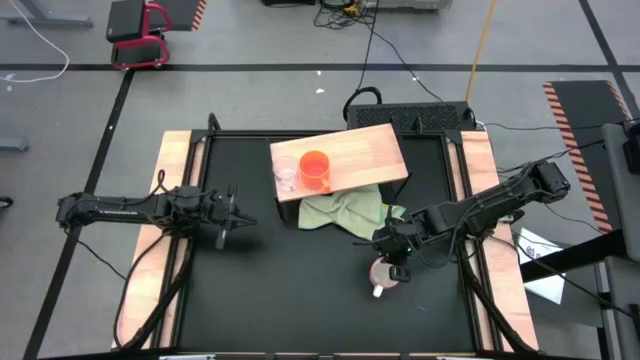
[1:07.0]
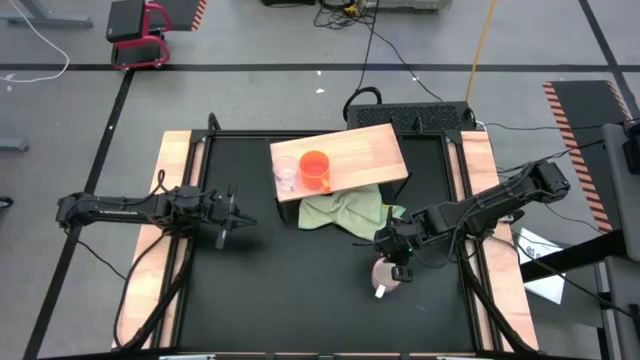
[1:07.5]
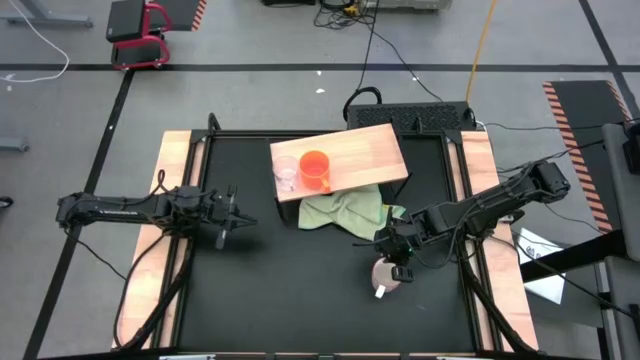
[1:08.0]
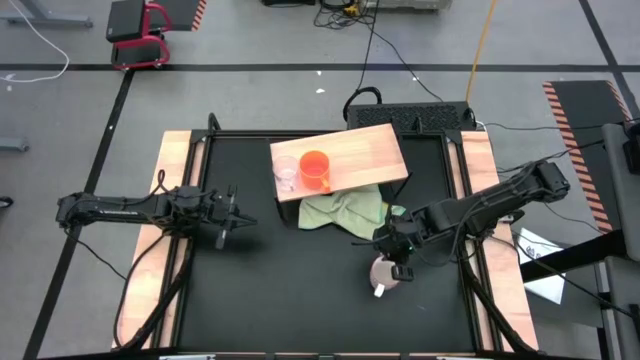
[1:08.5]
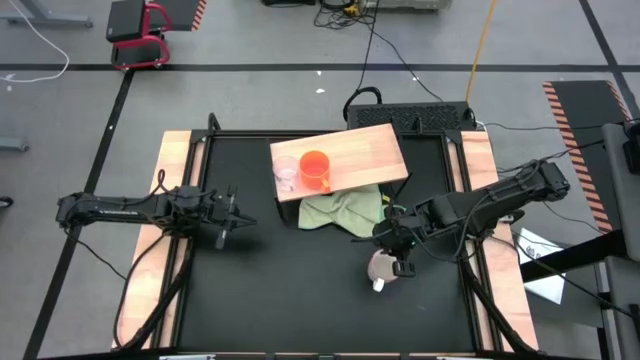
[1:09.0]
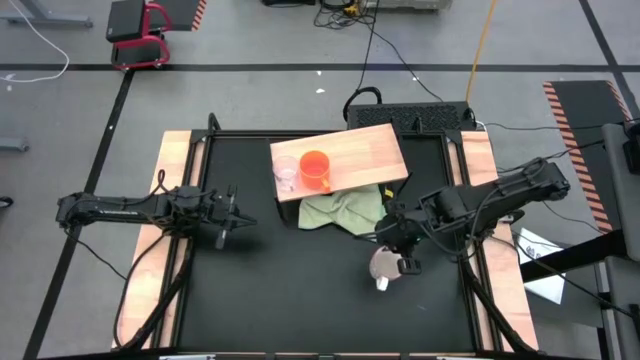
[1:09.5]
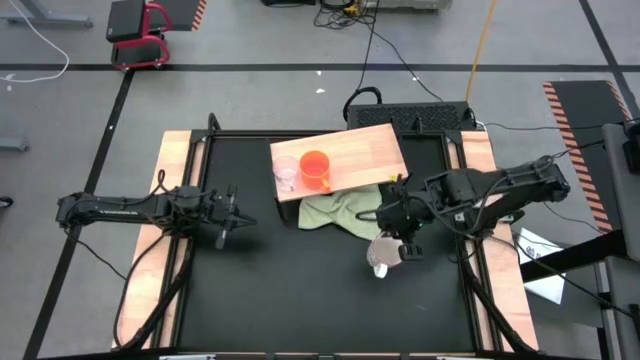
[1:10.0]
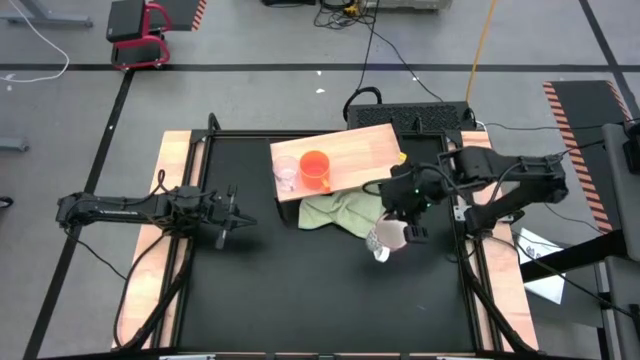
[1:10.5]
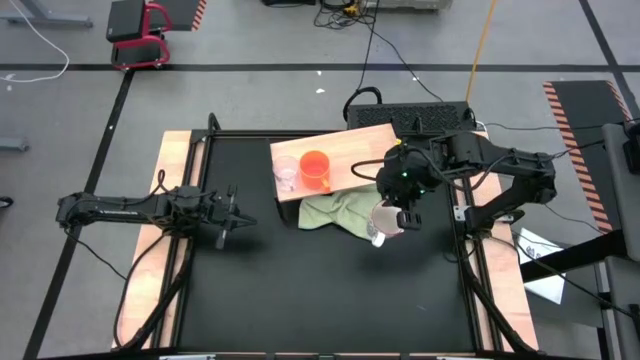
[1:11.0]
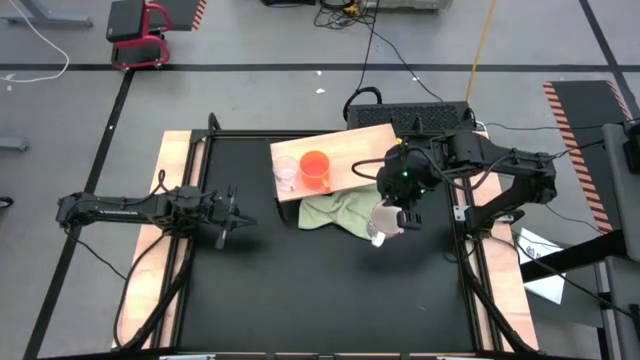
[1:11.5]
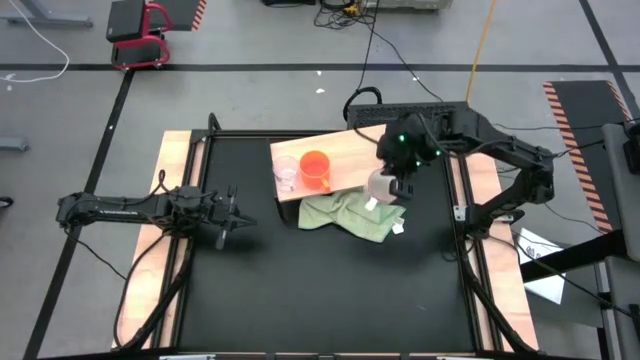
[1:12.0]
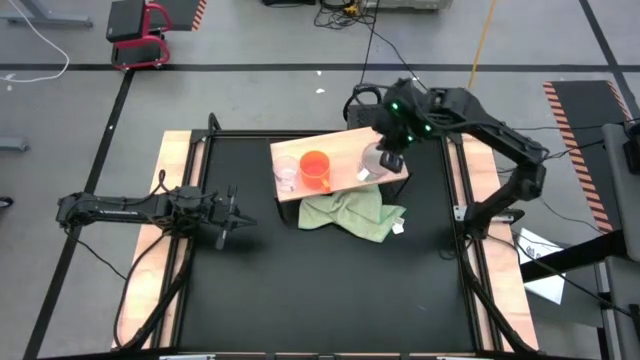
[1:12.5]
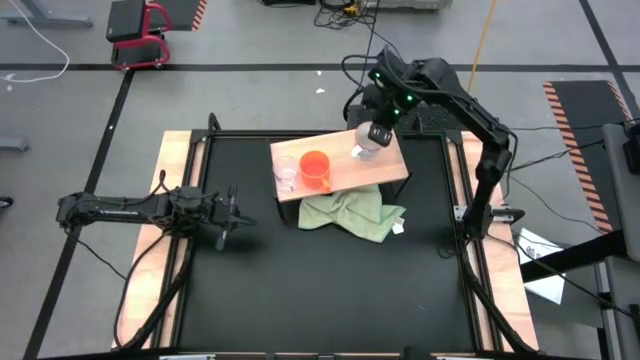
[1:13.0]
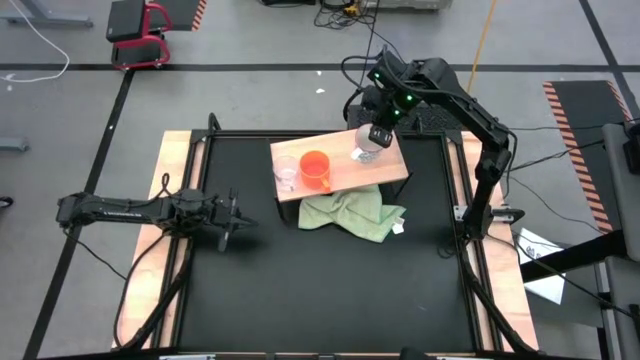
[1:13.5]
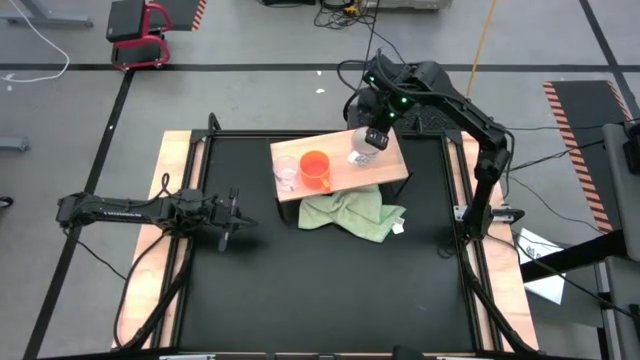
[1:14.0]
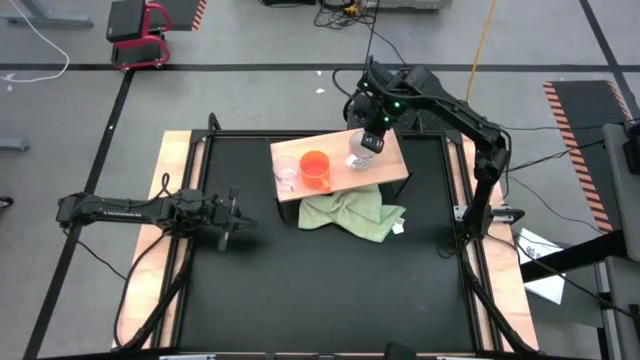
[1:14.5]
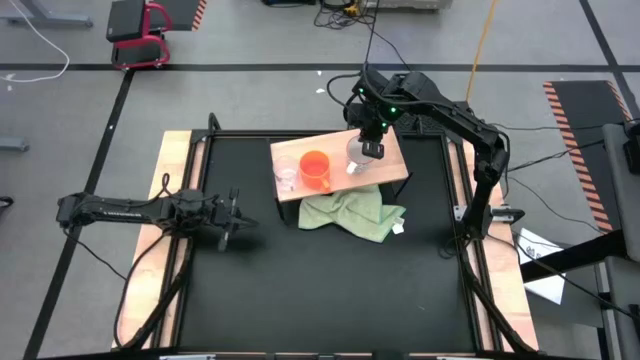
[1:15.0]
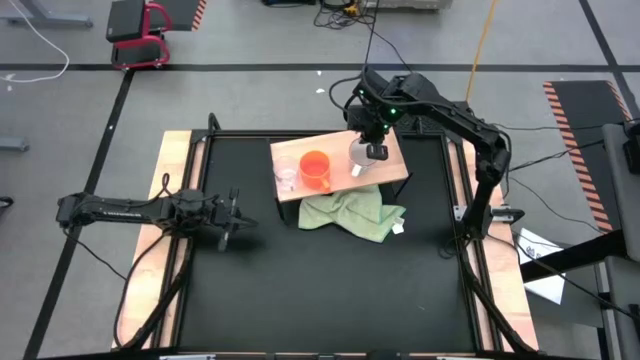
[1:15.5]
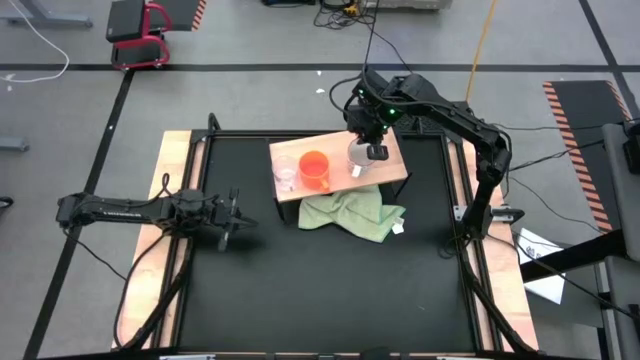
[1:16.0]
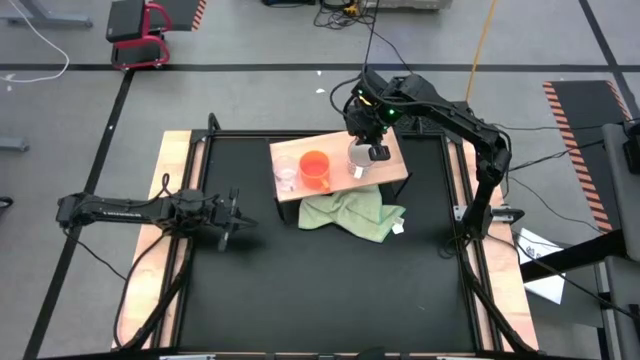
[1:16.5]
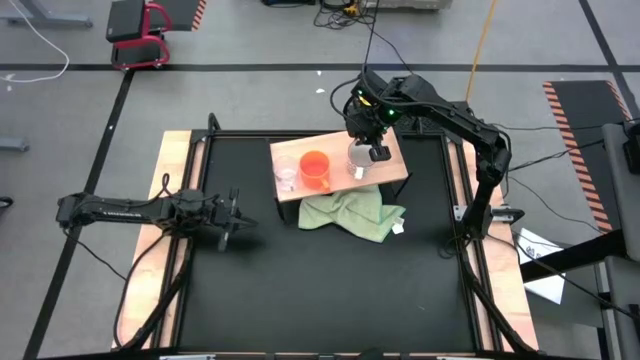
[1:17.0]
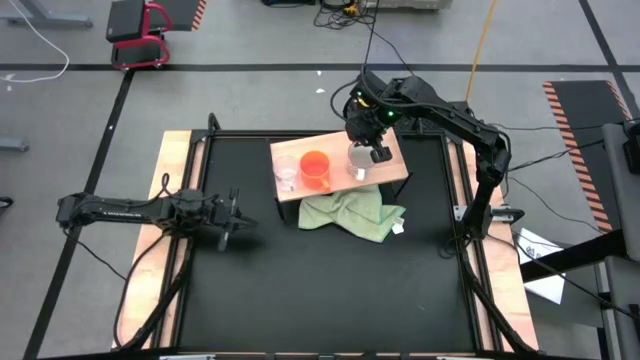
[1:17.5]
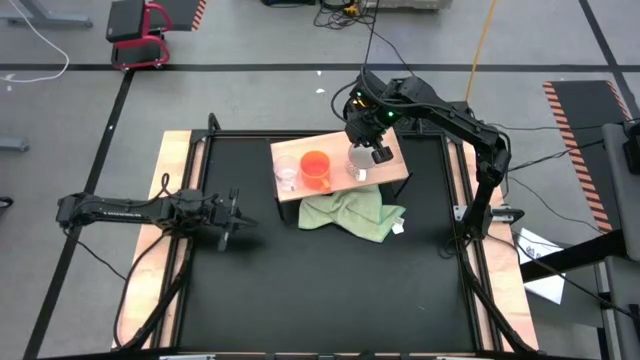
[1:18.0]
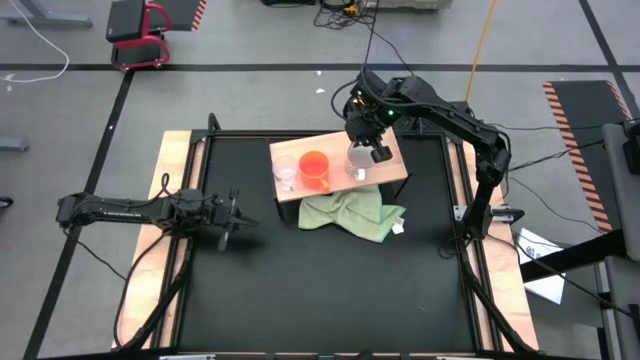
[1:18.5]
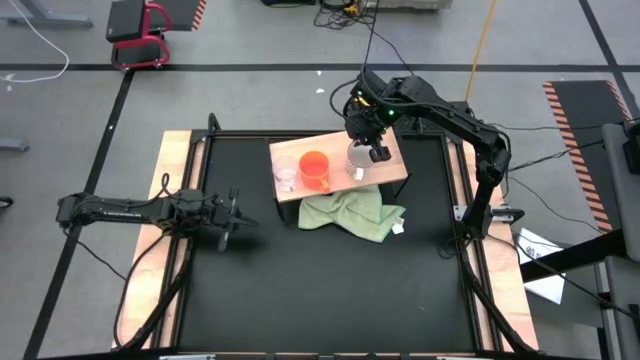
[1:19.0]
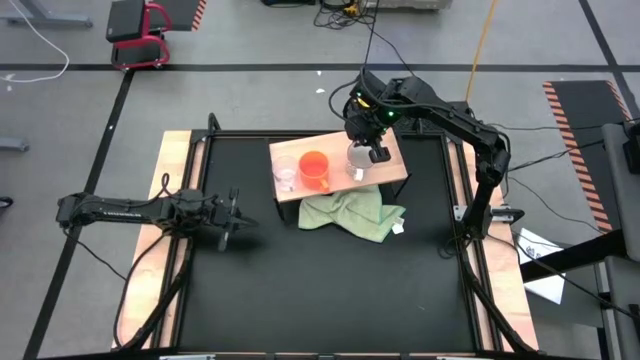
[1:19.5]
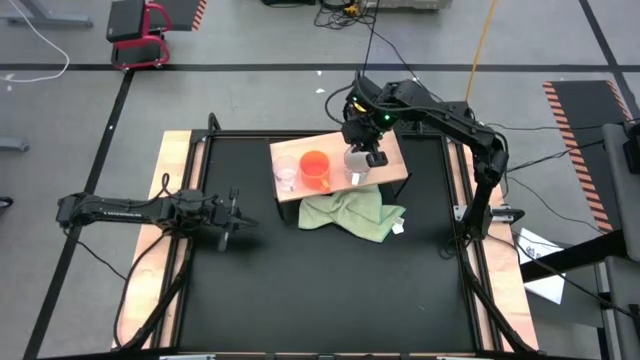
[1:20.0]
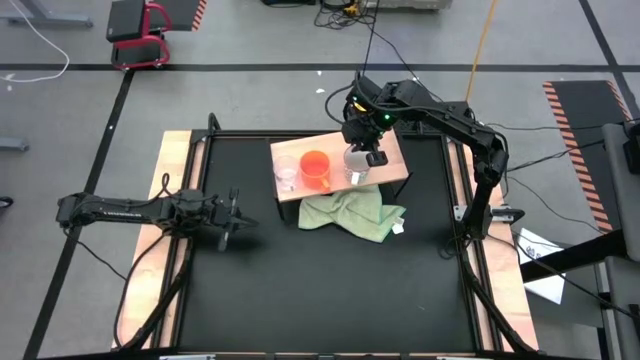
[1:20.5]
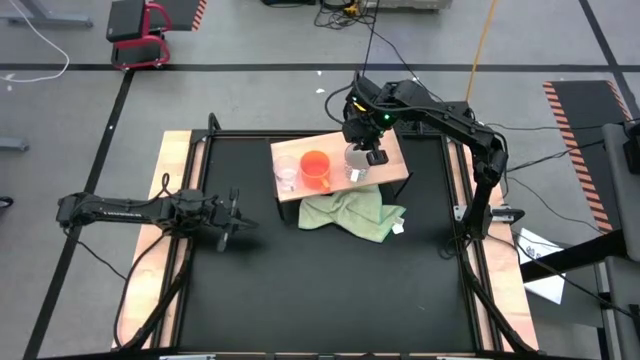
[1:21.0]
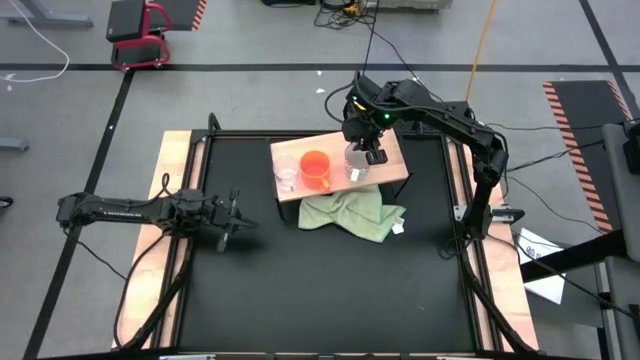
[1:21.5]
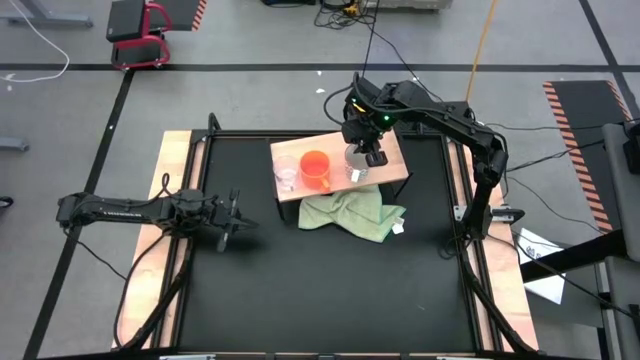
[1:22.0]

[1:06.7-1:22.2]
Task: Stack small to large cups/mugs on shelf
Put white cup on the shelf

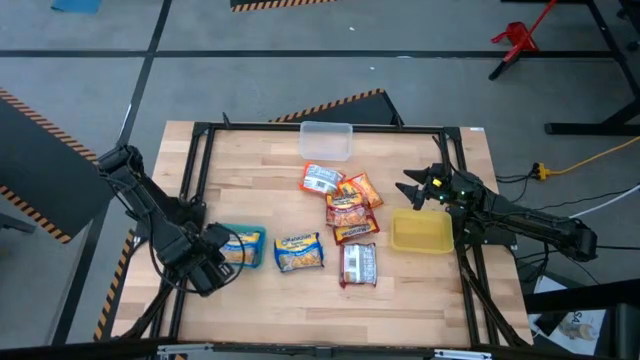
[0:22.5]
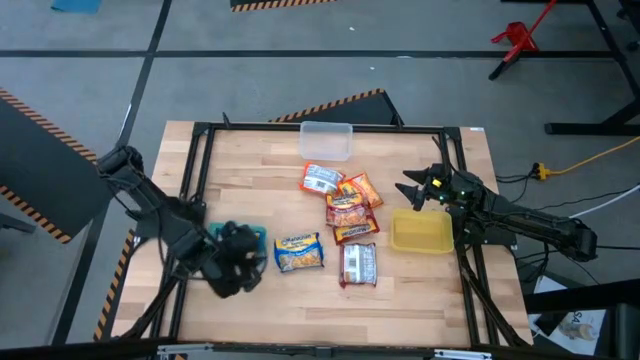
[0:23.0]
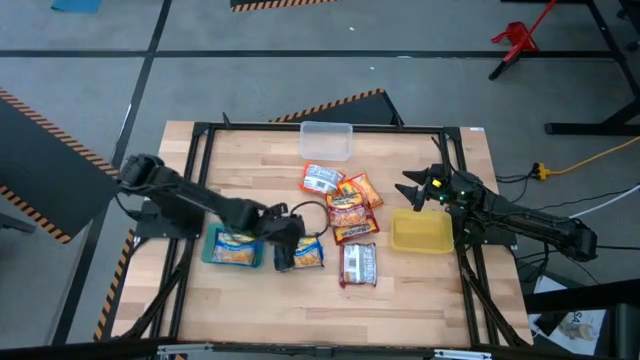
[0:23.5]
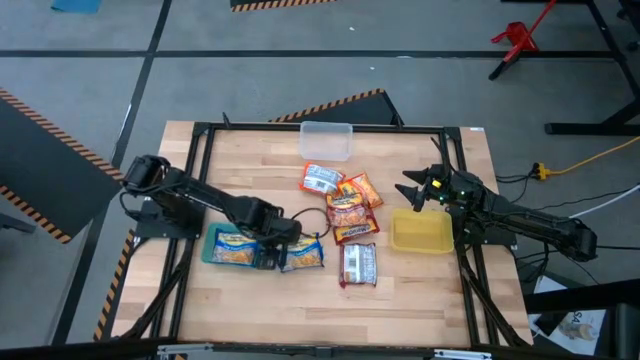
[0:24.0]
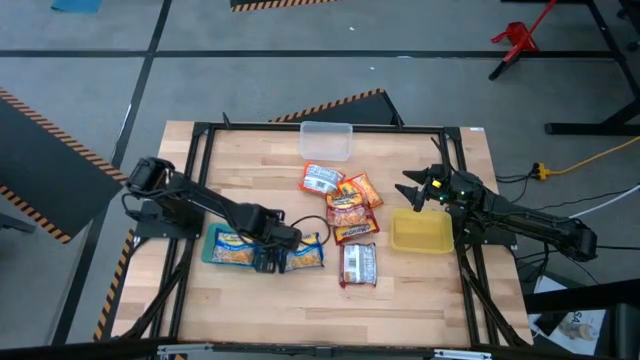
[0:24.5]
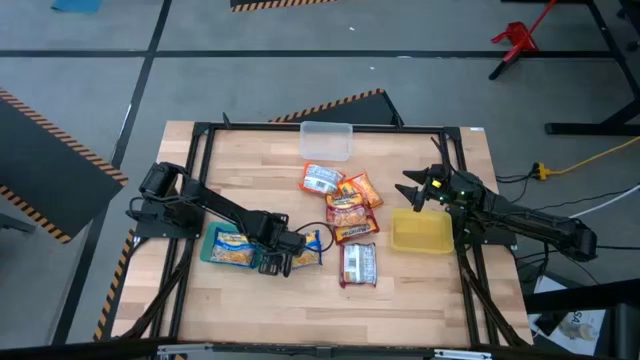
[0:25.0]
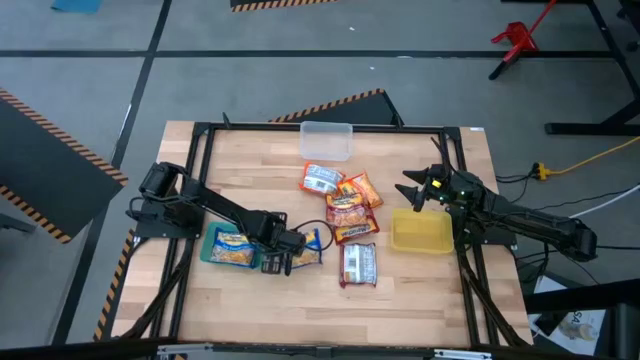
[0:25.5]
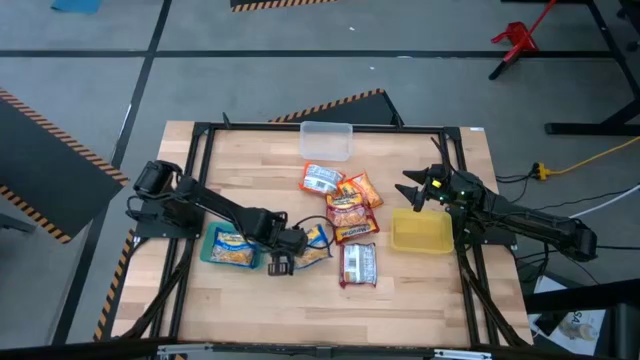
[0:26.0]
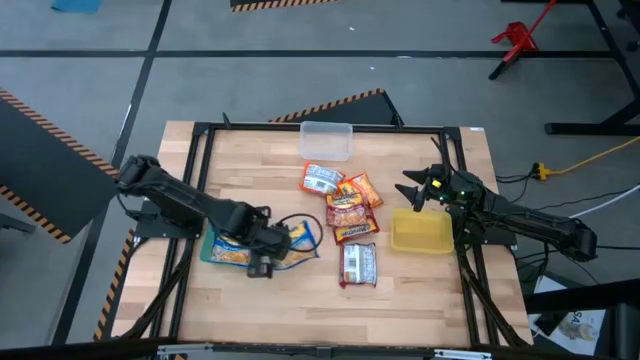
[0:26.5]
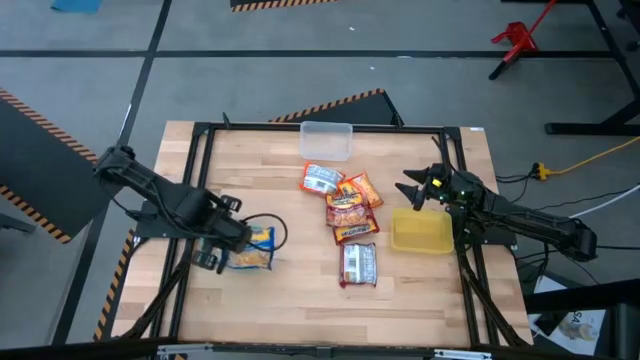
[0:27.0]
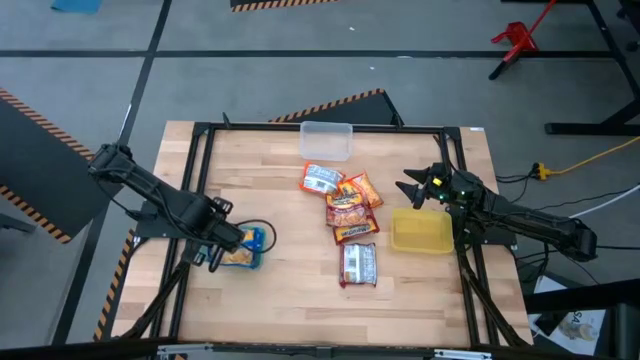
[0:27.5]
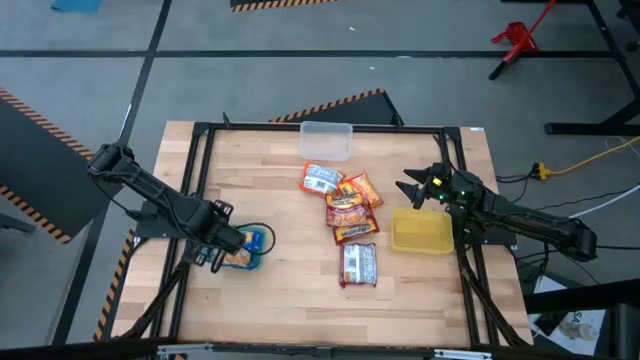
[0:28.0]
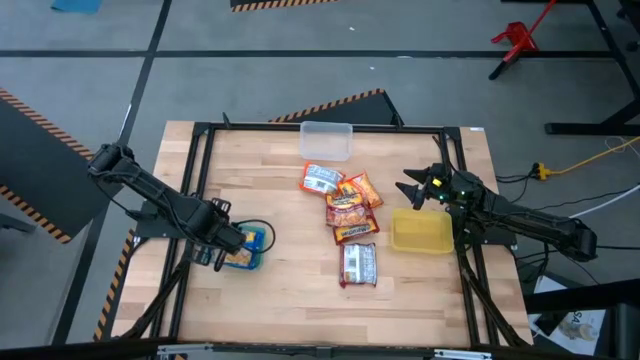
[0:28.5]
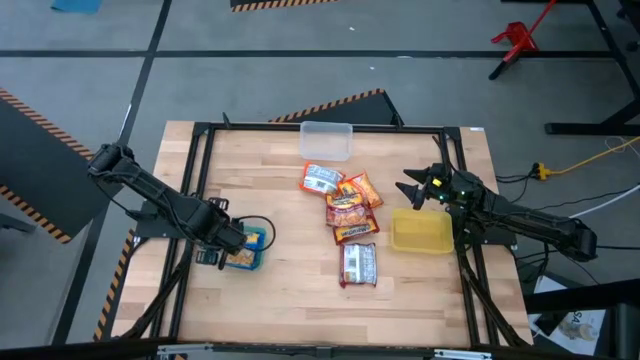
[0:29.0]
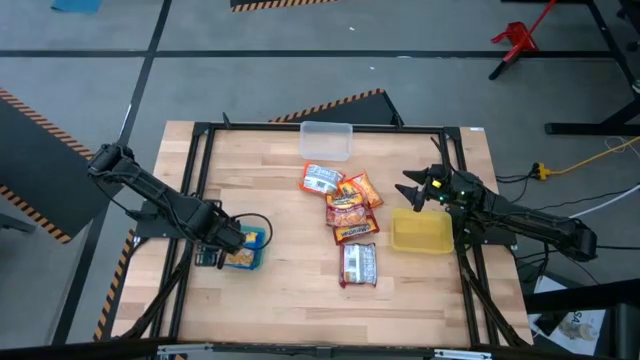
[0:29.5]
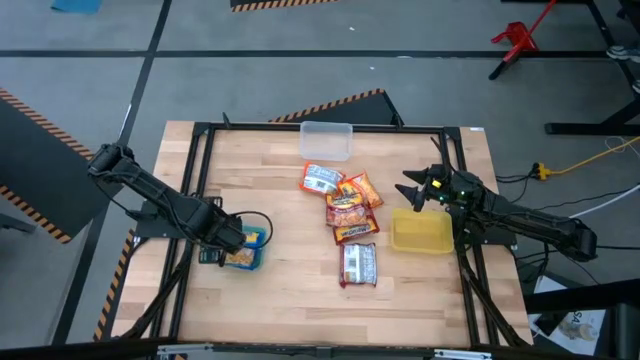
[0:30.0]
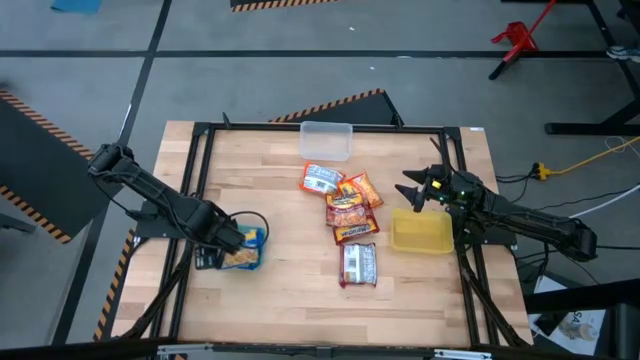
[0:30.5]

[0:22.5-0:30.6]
Task: Sort Maruchan noodles
Put the blue noodle pack into the green bin
